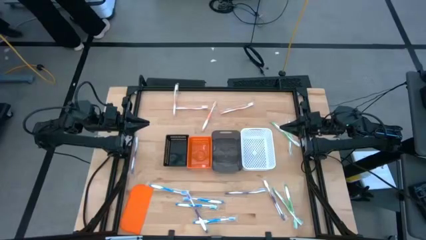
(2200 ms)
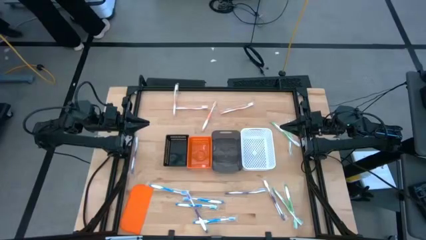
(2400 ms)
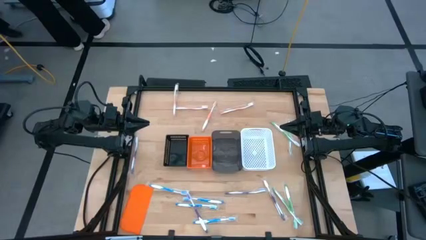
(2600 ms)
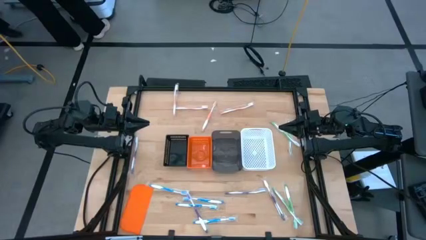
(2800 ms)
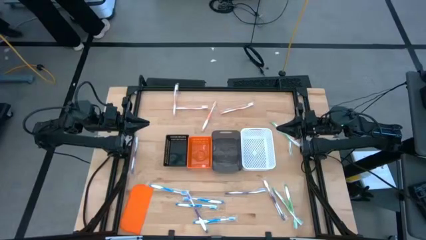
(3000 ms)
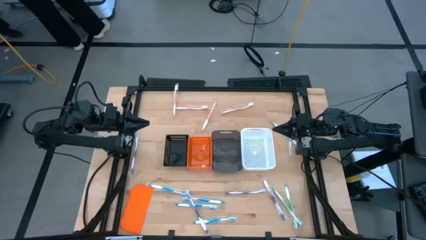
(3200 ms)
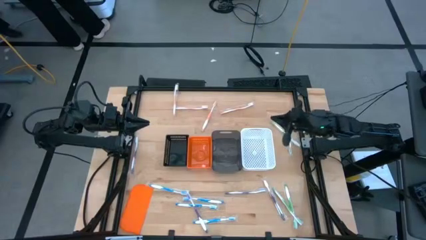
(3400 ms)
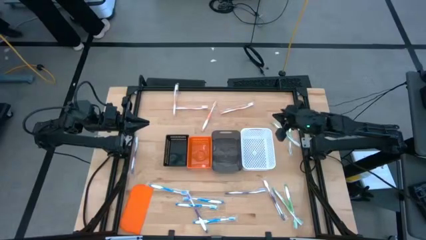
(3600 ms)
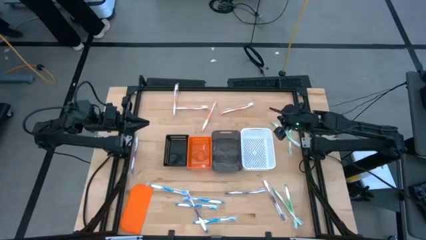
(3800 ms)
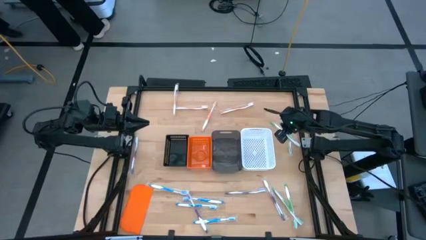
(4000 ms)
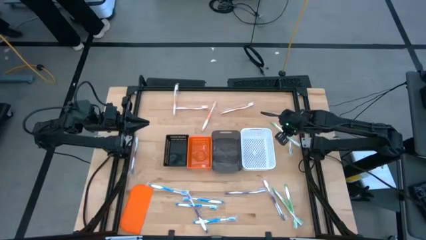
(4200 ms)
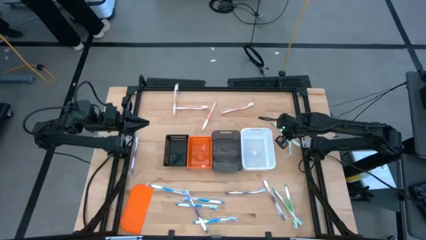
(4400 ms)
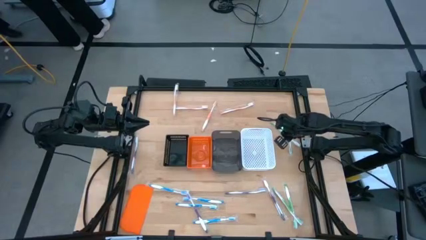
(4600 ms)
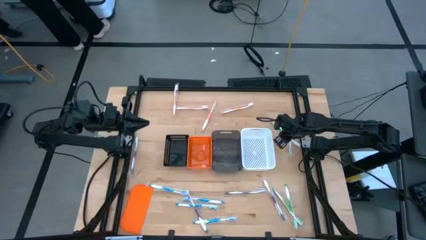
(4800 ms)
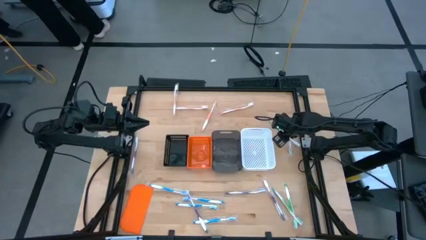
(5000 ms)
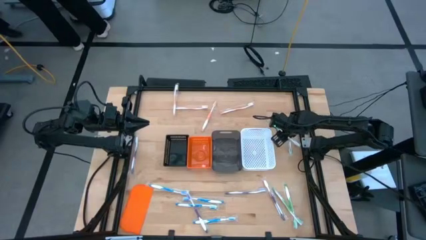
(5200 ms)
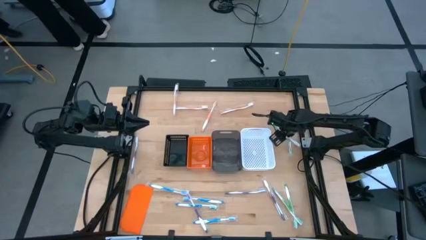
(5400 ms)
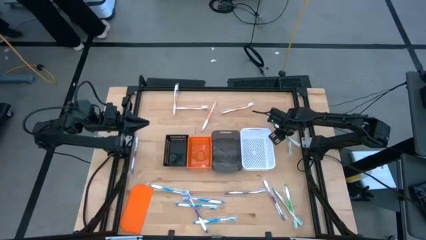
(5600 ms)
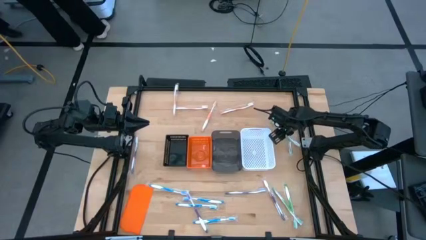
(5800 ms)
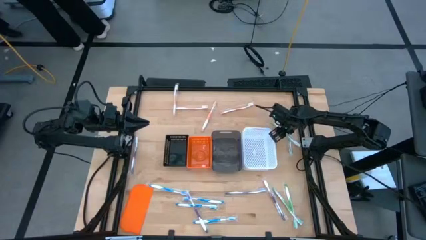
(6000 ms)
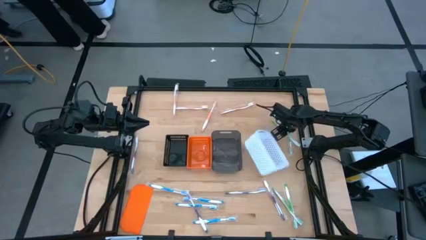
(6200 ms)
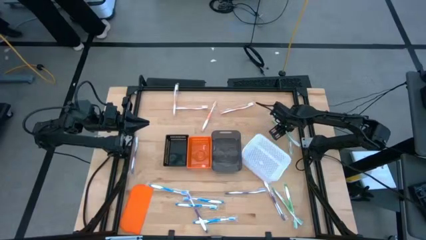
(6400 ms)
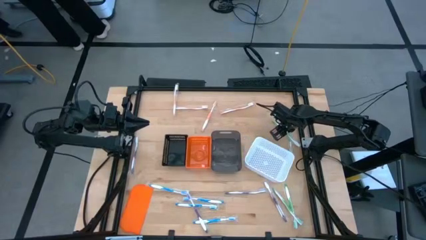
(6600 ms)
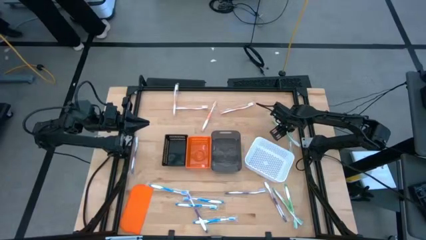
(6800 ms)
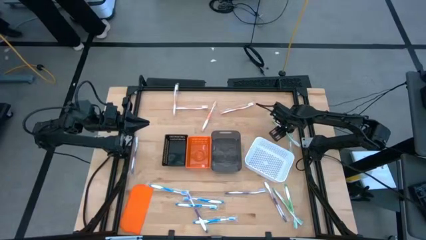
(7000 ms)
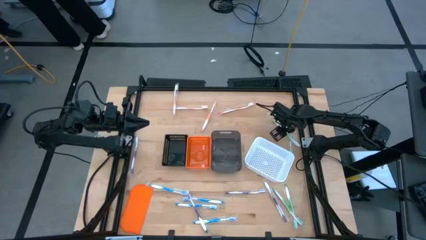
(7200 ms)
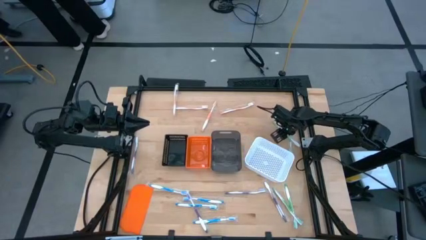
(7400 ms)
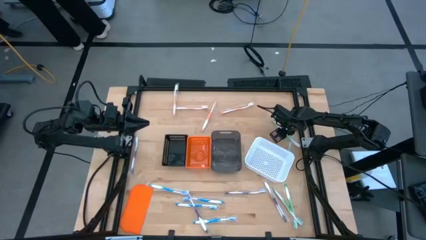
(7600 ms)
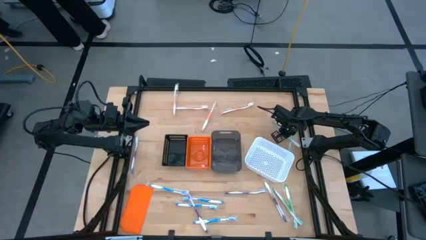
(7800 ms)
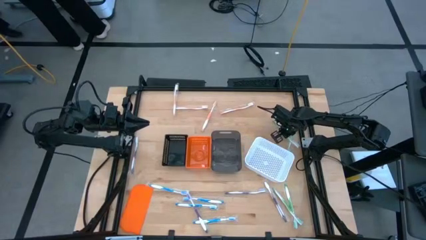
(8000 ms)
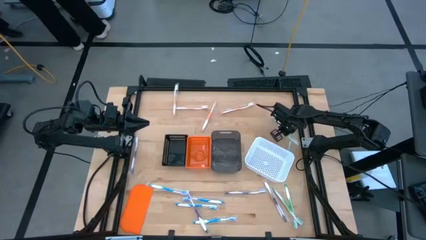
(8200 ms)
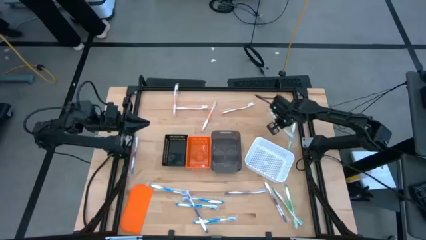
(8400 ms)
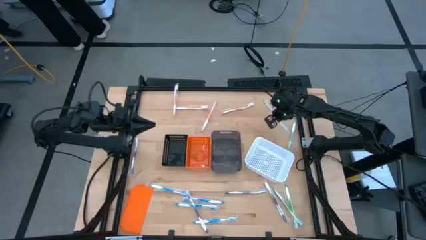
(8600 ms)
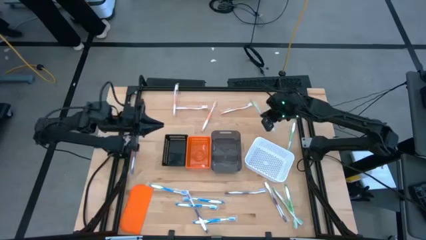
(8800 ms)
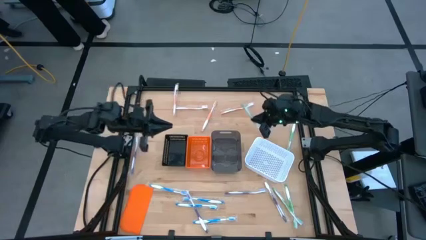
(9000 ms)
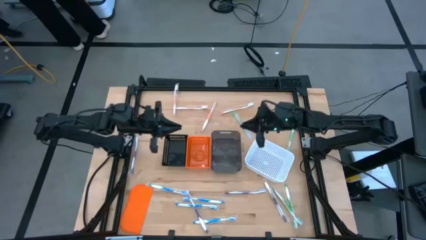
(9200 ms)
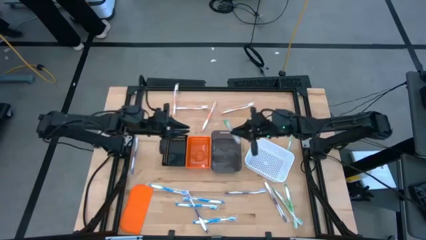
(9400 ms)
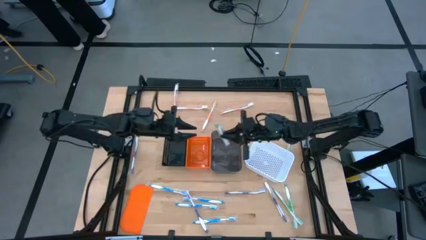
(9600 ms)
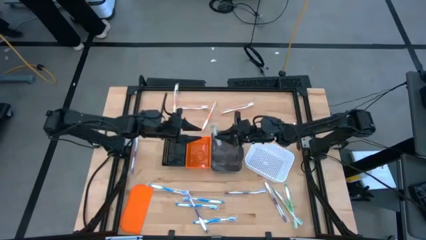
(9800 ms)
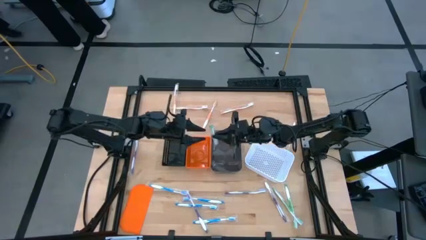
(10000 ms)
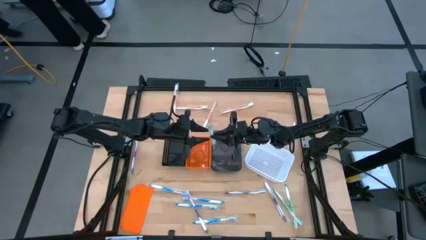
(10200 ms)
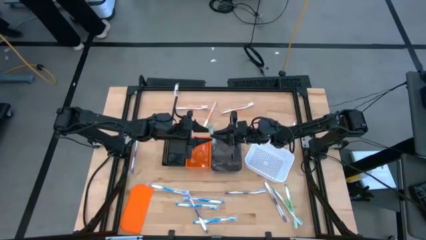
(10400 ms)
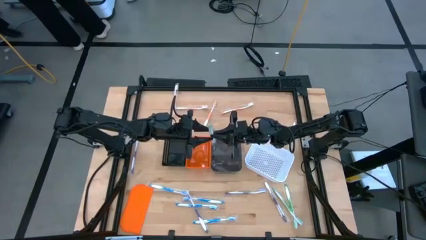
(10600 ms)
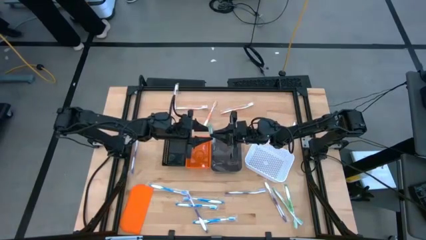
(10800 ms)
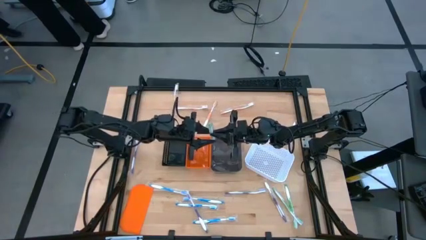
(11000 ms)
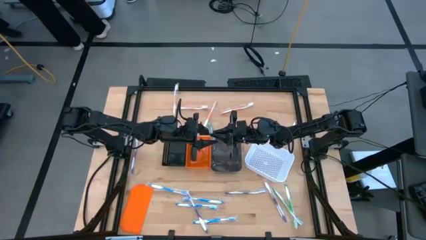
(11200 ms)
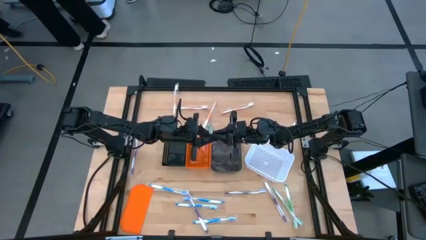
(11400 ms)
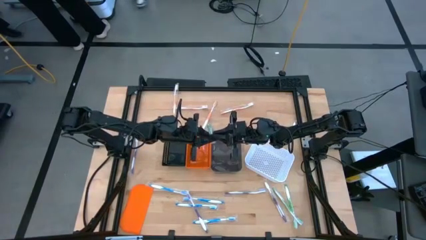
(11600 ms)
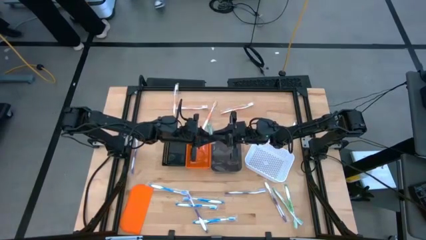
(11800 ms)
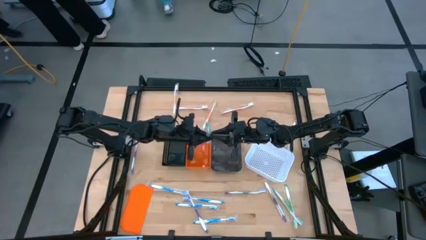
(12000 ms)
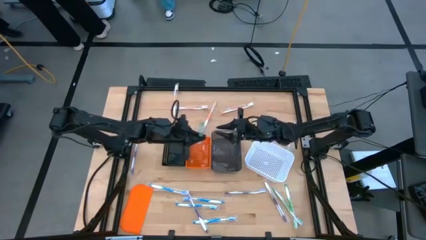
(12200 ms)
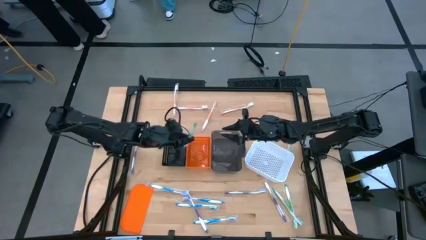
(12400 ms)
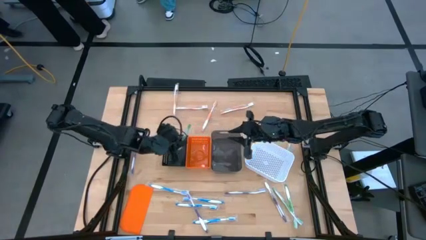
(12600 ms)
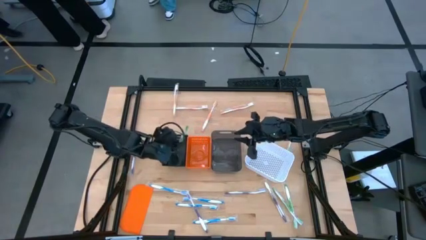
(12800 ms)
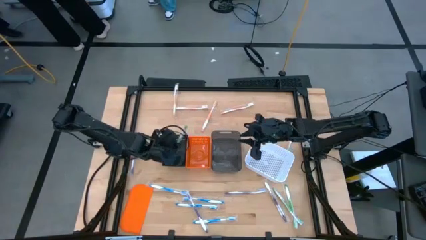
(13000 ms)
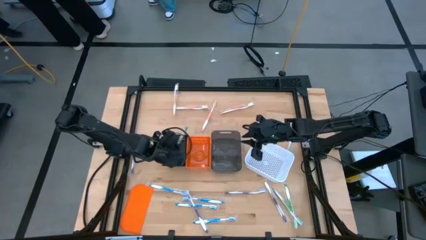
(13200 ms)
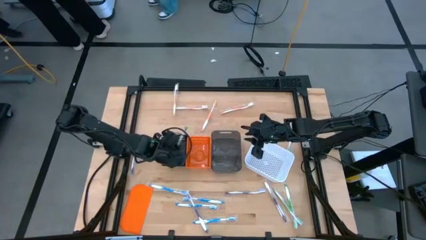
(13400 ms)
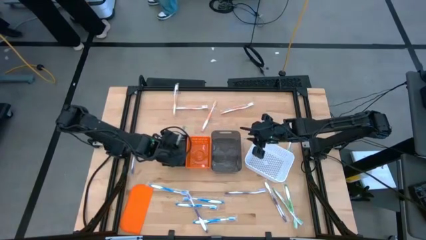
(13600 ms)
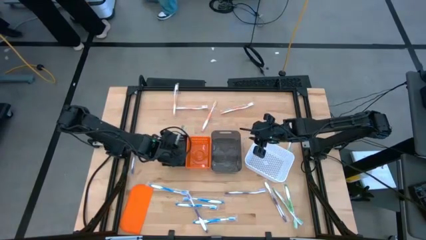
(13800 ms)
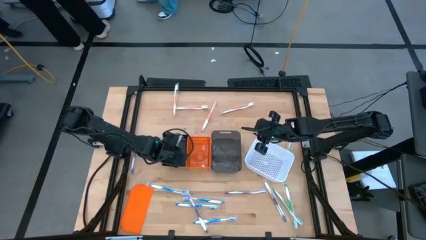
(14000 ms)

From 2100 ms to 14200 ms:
Task: Pick & Place Toothbrushes
Put the green toothbrush into the black bin

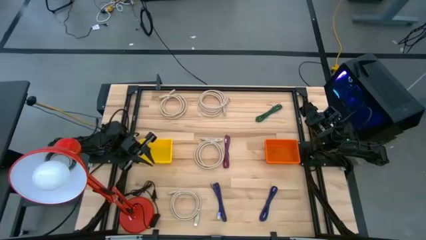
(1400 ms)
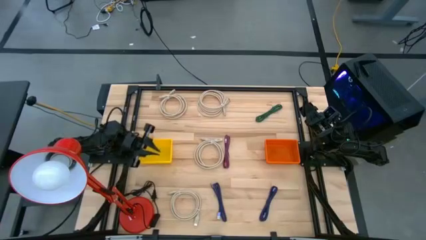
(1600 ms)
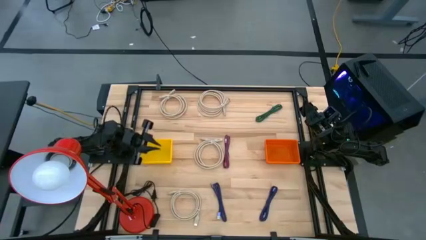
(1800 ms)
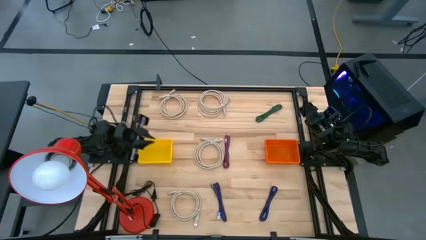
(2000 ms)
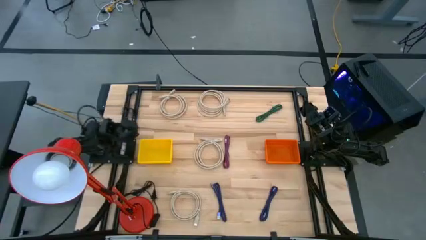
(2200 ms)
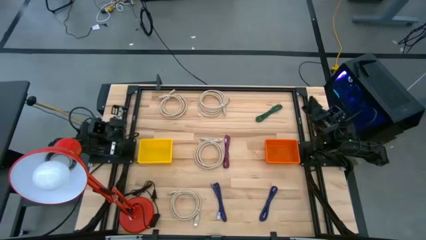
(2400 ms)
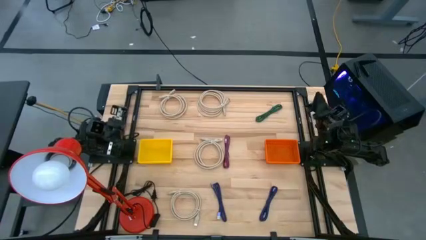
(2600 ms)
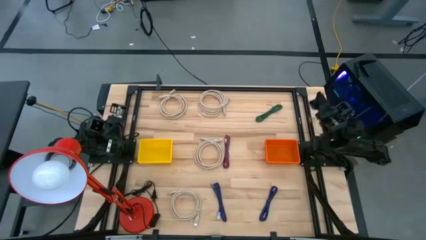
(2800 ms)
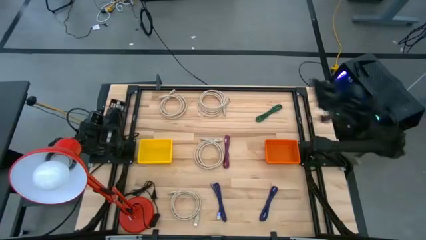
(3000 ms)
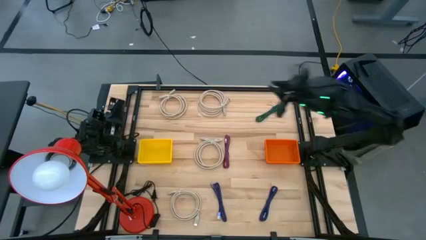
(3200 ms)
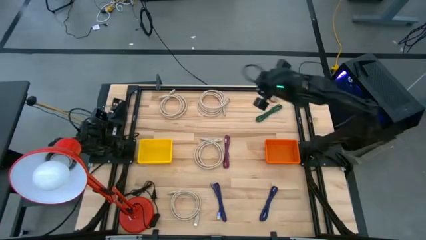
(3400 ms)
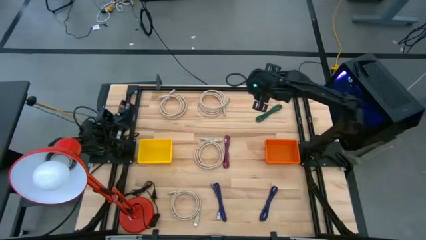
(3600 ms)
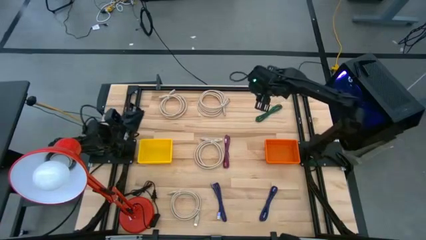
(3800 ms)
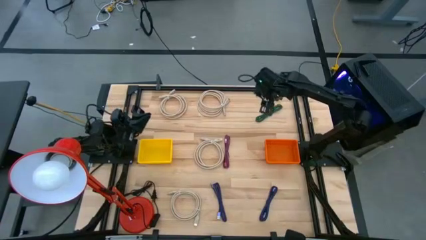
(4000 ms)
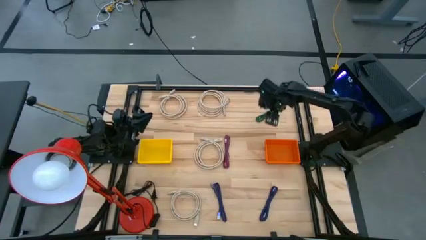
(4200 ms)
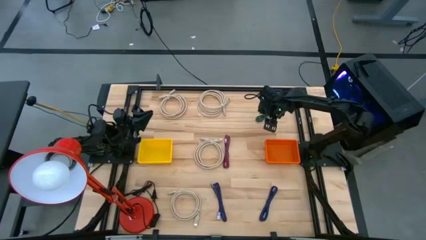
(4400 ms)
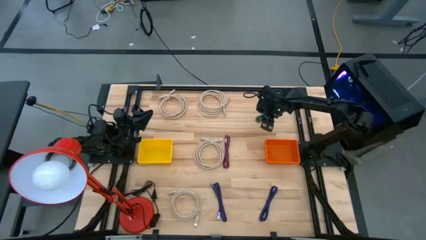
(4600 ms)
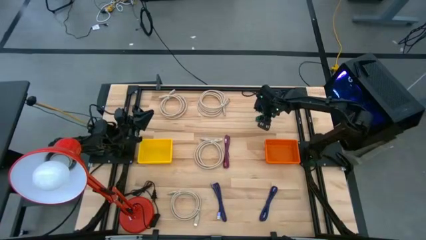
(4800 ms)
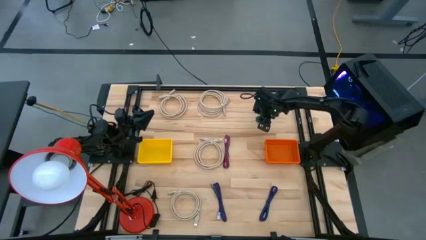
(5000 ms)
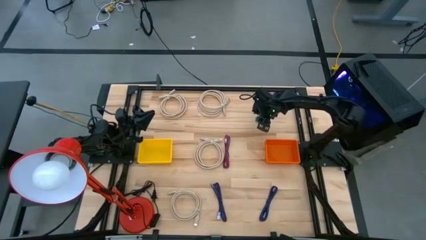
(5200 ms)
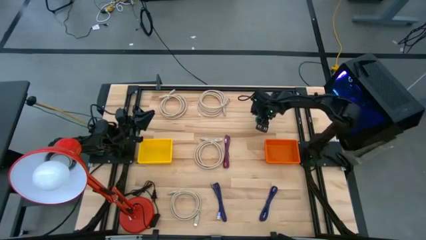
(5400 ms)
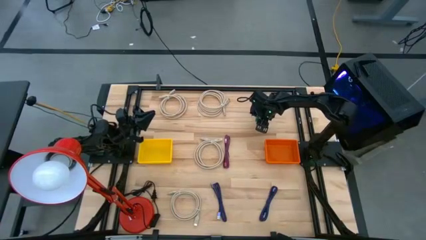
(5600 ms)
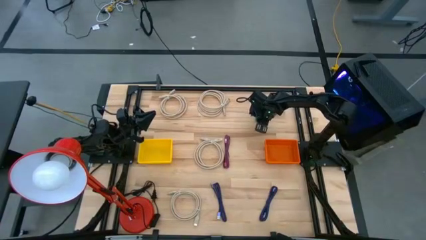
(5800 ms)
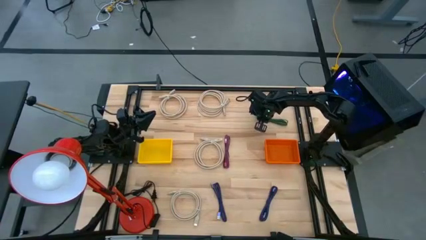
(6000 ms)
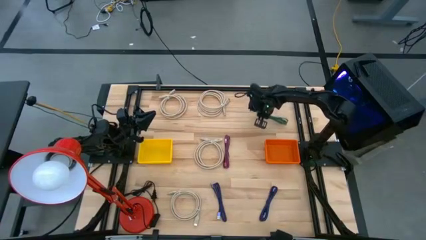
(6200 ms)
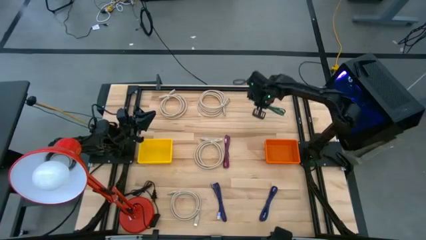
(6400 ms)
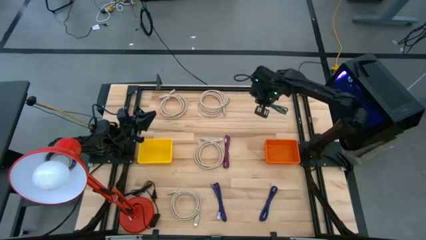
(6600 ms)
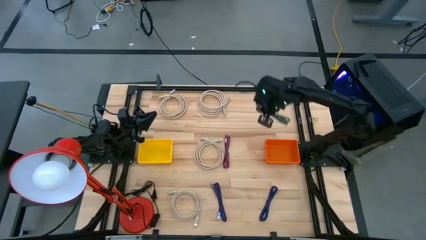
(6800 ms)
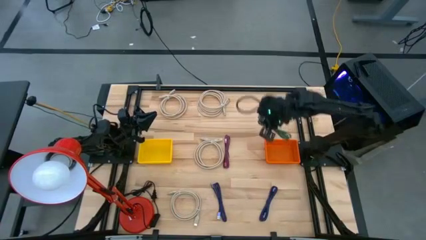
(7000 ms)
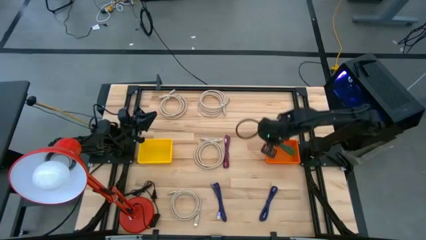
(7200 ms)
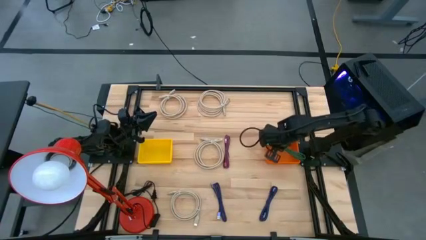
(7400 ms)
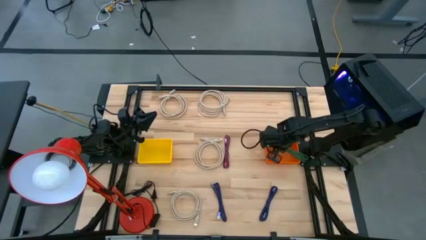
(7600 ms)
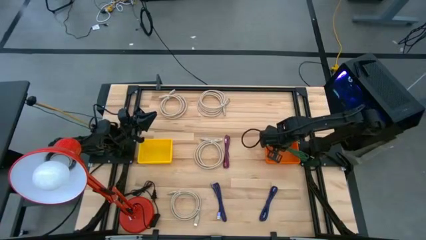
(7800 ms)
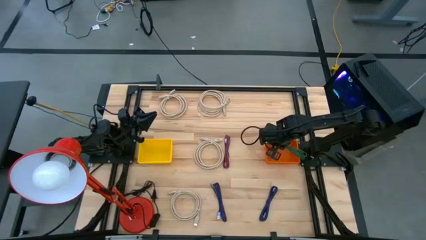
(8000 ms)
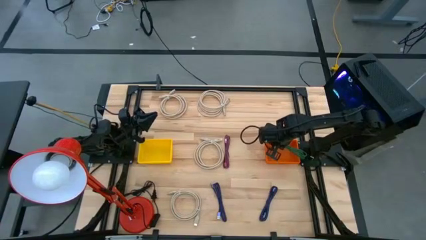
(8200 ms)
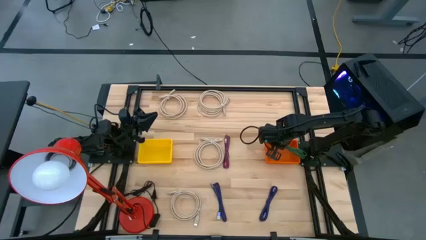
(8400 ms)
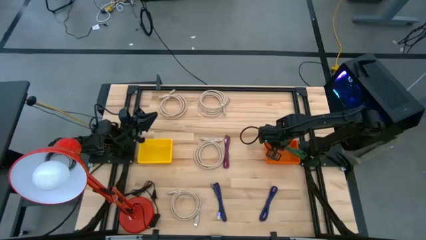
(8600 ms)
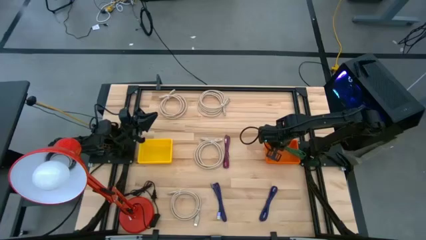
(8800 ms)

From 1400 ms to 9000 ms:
Task: Pick & Place USB Port
Put the black and green charger cable into the orange bin
